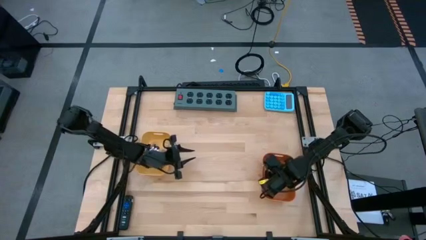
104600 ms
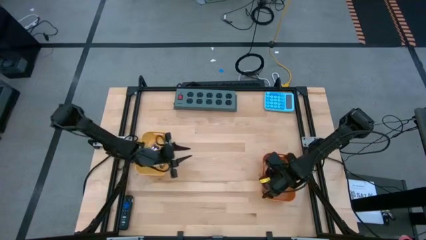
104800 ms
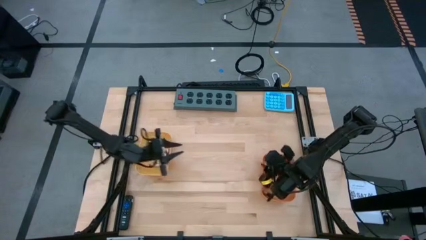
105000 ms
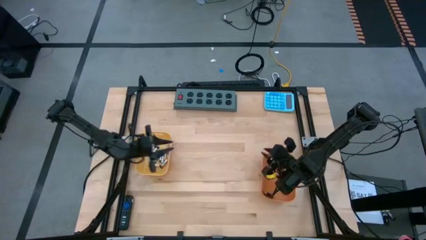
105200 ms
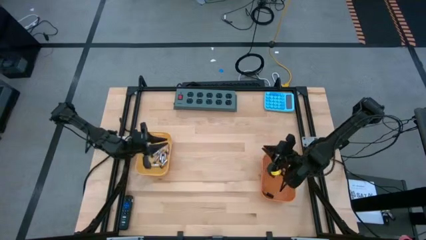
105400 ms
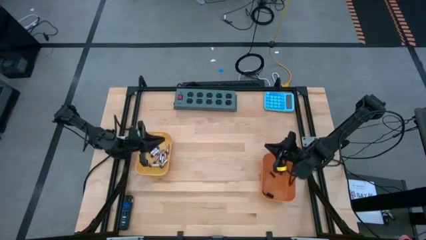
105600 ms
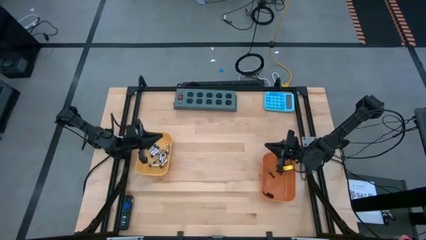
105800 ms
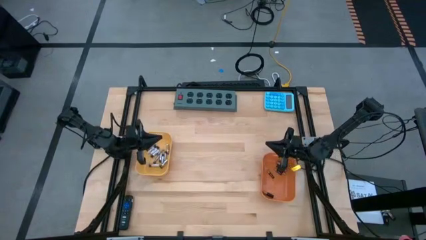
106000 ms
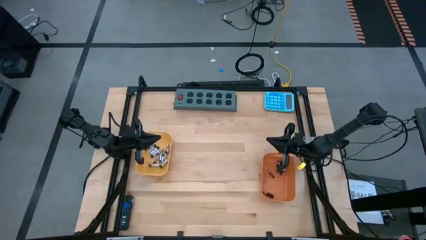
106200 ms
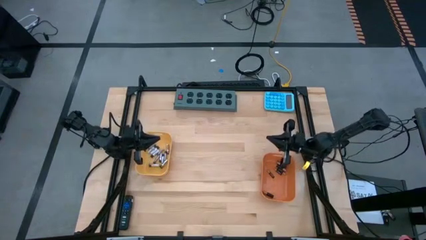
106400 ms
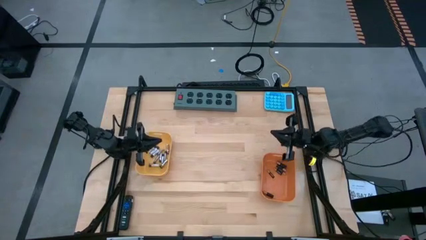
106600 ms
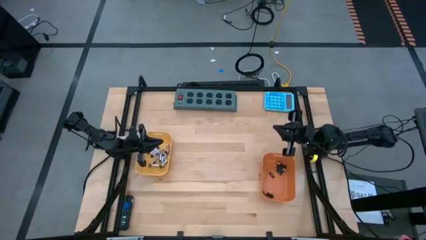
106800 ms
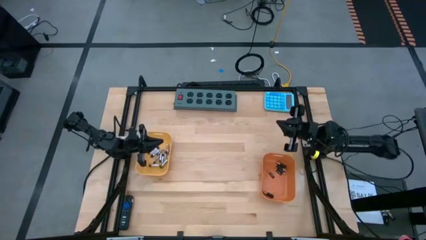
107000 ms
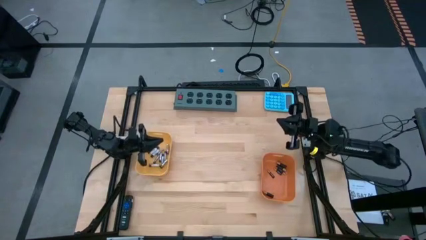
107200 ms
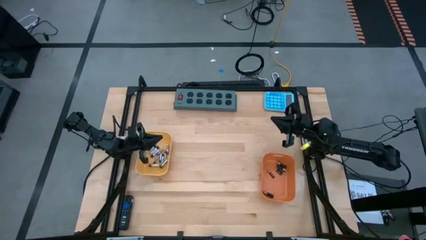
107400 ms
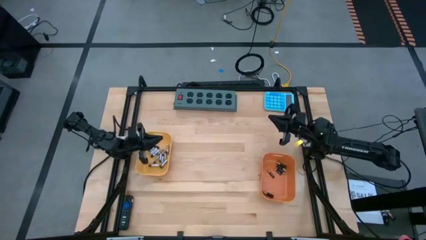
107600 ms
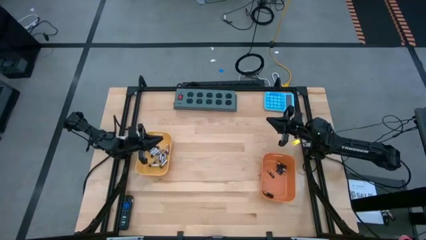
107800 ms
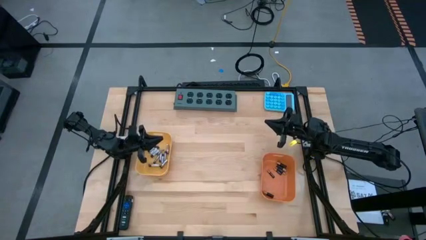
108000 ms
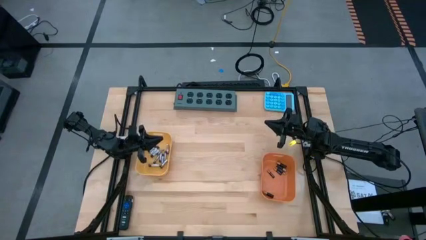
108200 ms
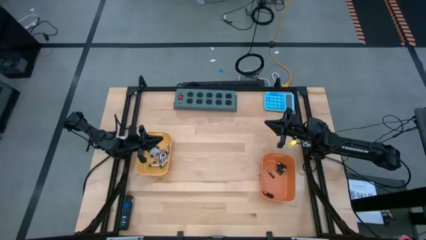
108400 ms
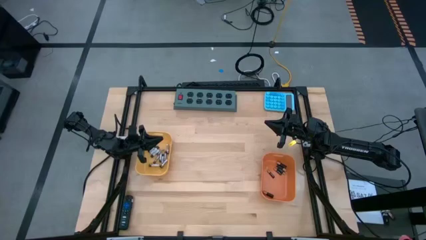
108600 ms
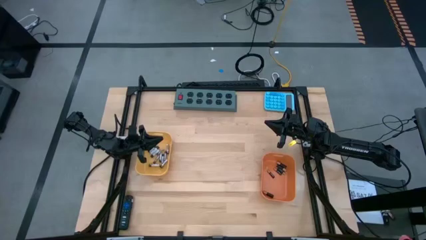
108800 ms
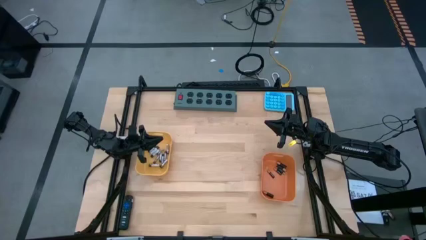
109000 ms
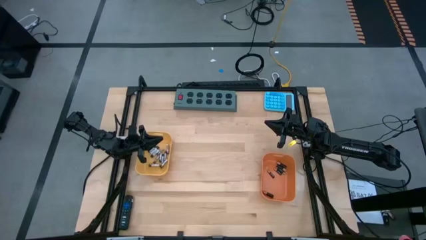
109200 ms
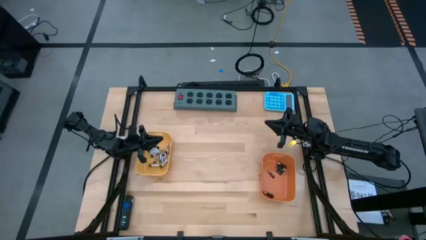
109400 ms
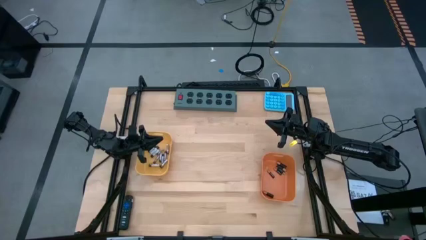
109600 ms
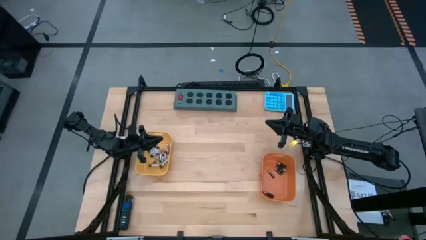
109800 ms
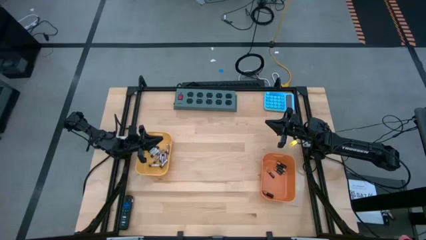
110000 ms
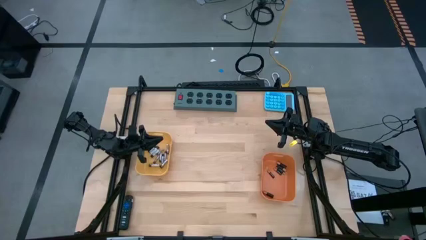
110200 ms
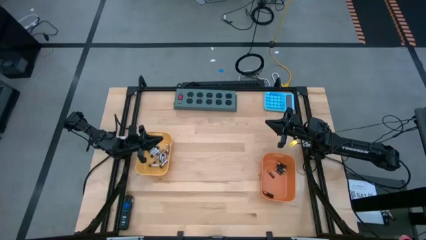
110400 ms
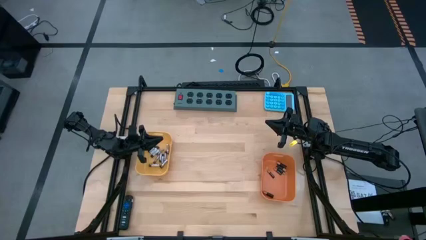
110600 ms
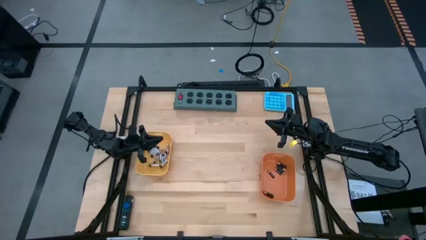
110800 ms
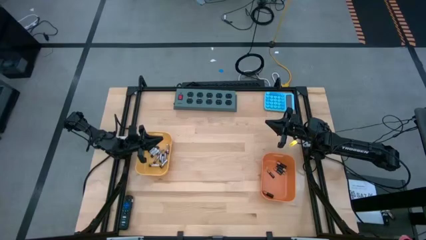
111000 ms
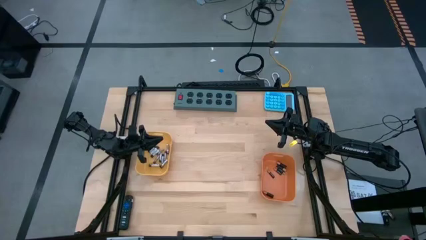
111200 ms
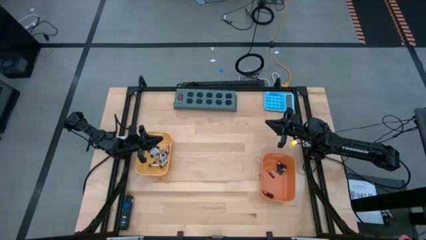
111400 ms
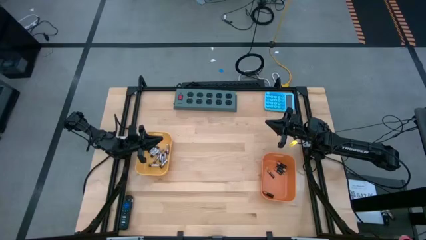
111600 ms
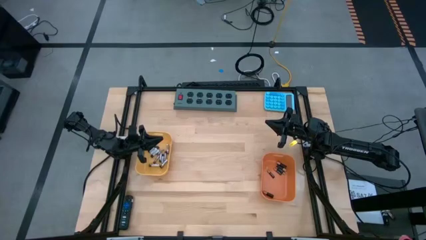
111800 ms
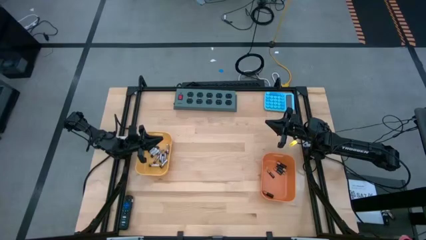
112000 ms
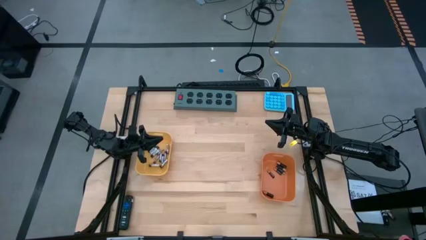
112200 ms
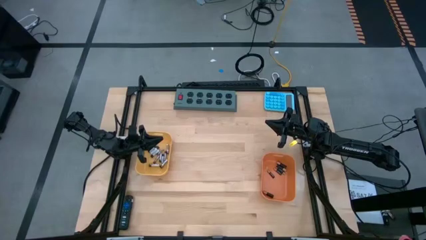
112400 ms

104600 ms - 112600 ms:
Task: Sort batteries
Return to Home Position

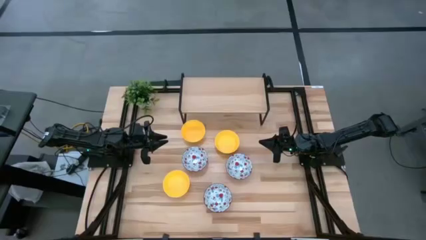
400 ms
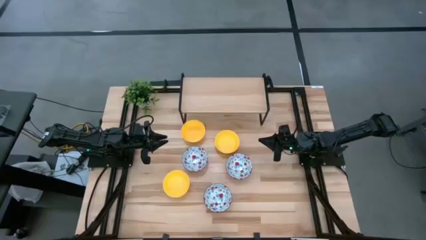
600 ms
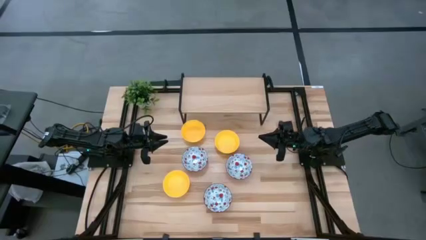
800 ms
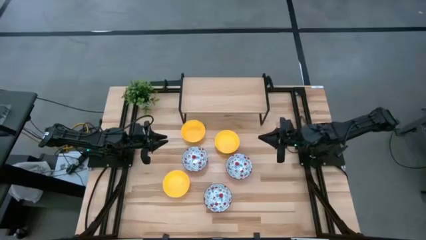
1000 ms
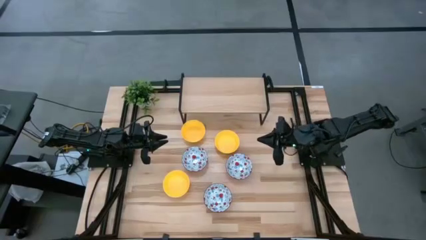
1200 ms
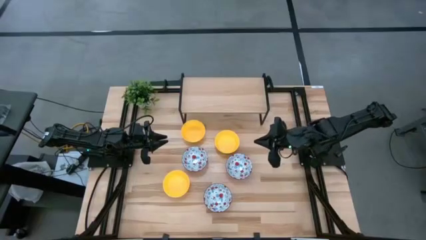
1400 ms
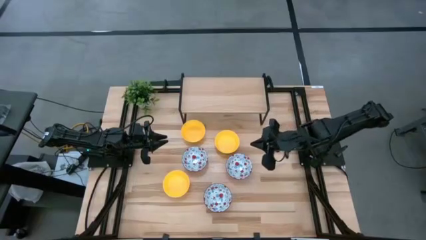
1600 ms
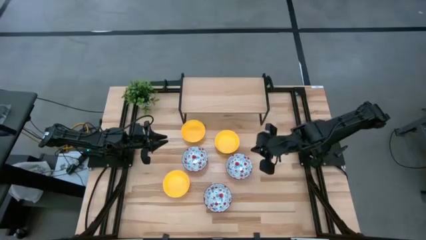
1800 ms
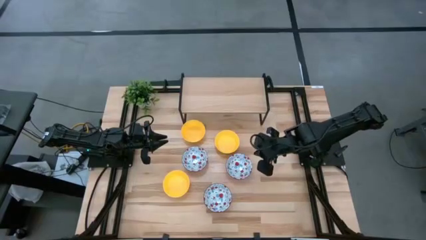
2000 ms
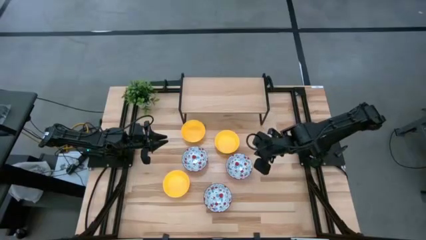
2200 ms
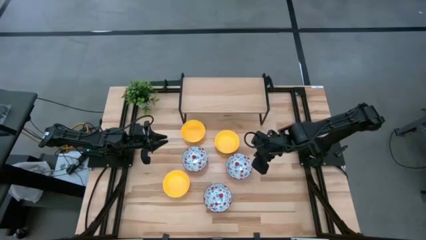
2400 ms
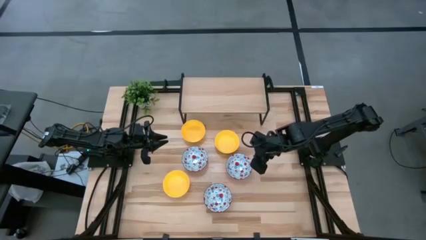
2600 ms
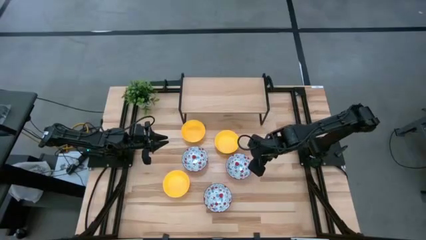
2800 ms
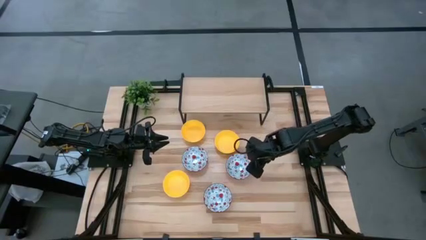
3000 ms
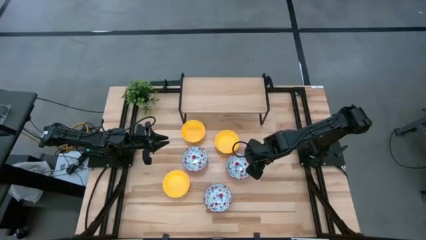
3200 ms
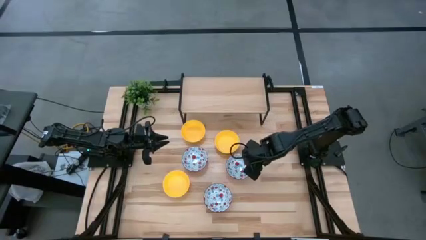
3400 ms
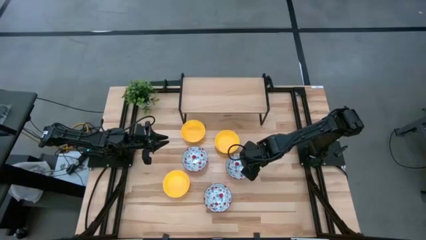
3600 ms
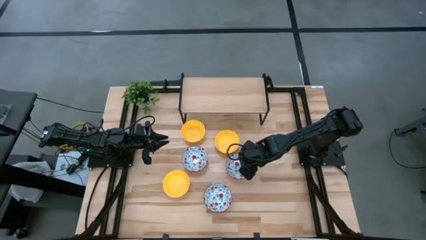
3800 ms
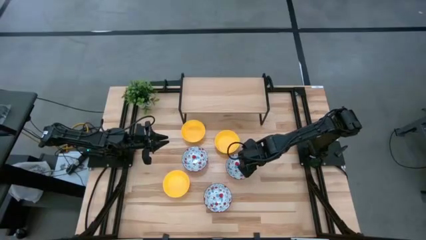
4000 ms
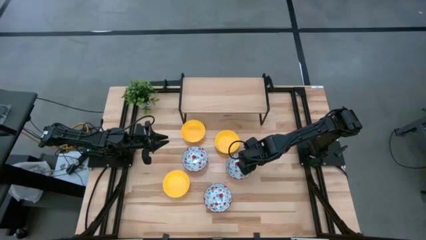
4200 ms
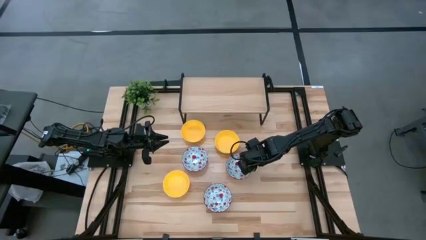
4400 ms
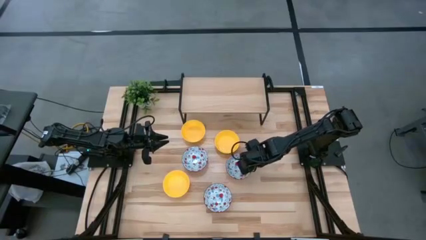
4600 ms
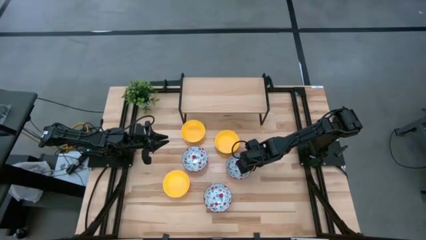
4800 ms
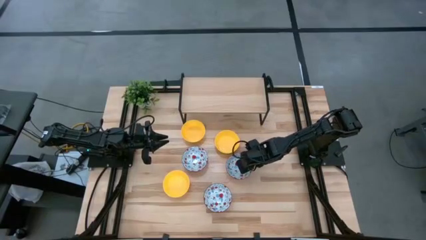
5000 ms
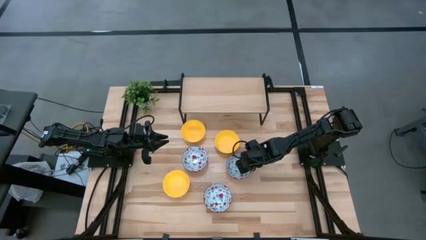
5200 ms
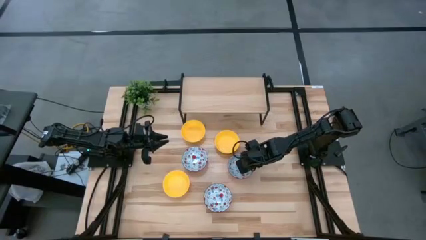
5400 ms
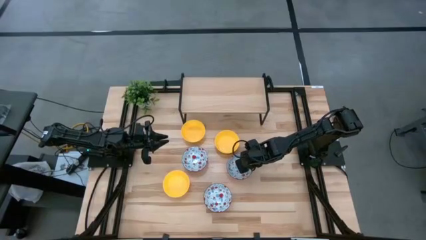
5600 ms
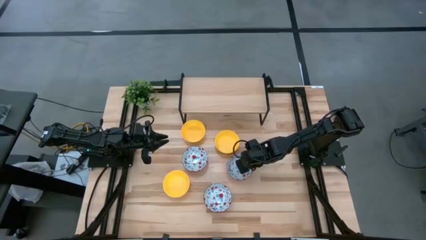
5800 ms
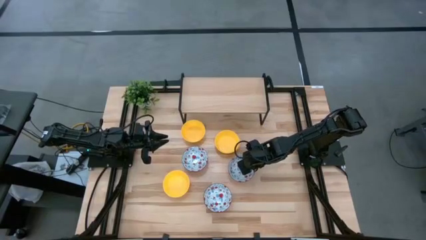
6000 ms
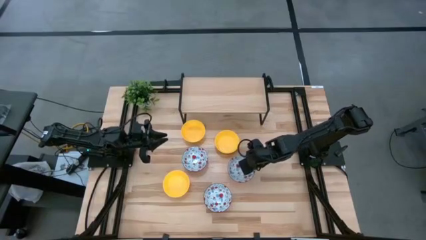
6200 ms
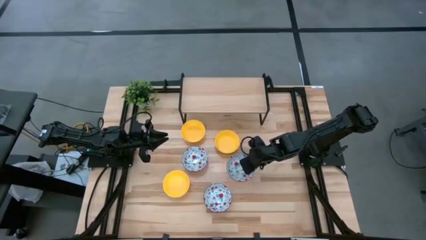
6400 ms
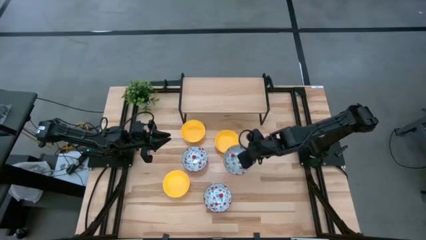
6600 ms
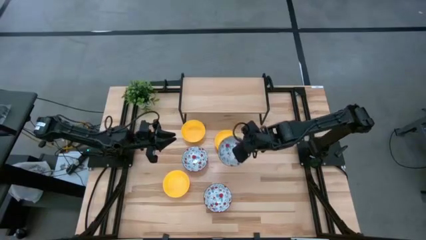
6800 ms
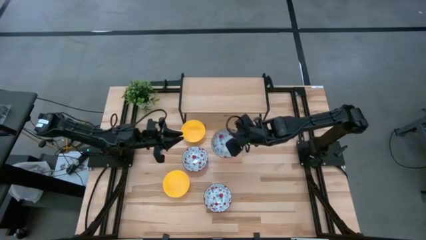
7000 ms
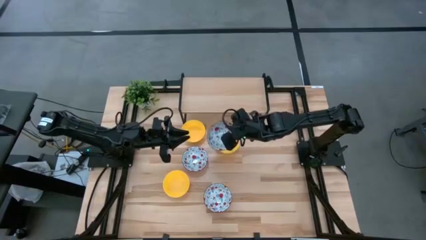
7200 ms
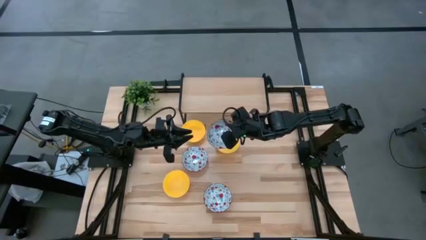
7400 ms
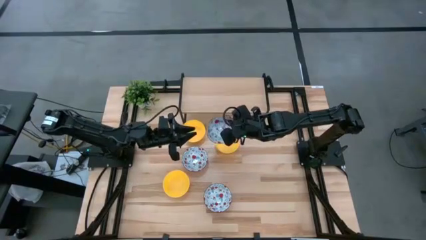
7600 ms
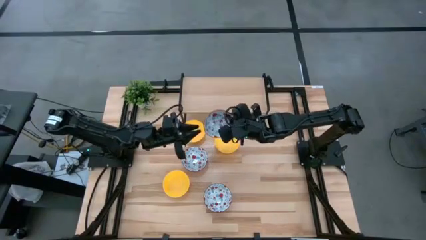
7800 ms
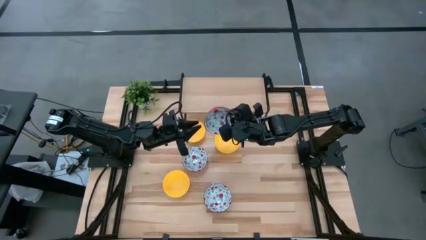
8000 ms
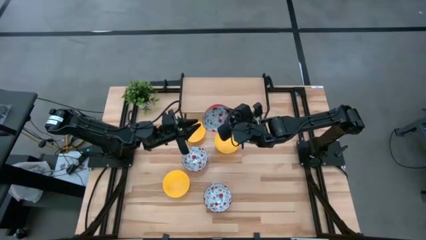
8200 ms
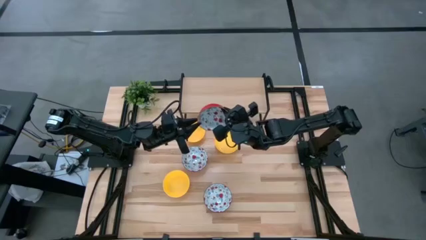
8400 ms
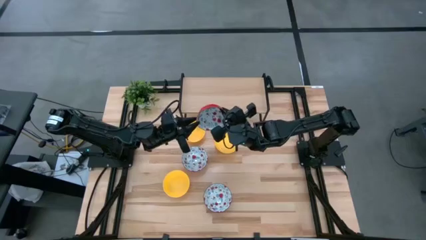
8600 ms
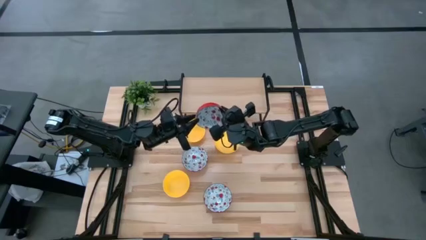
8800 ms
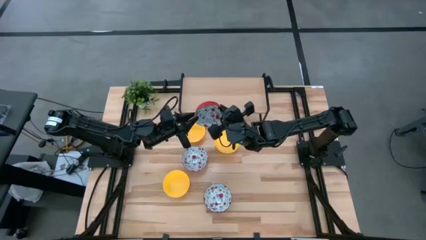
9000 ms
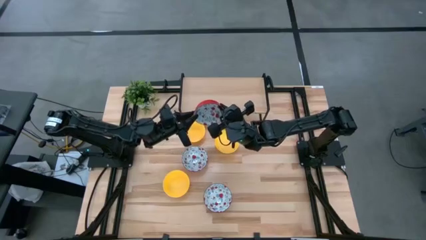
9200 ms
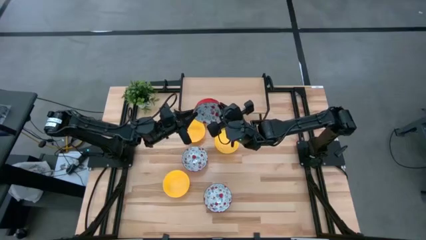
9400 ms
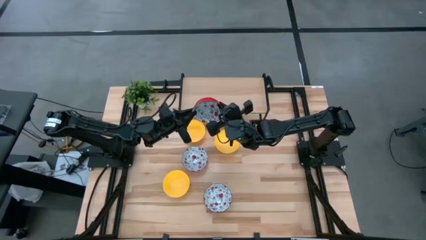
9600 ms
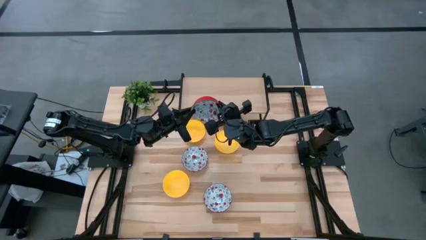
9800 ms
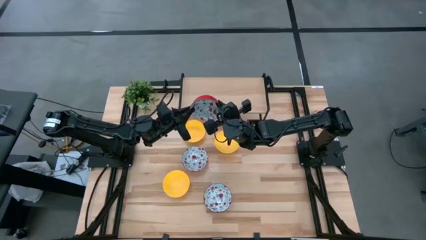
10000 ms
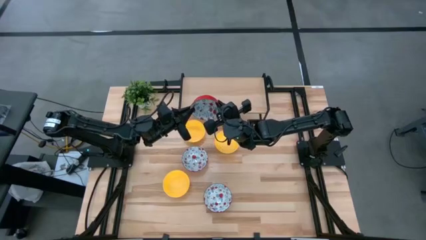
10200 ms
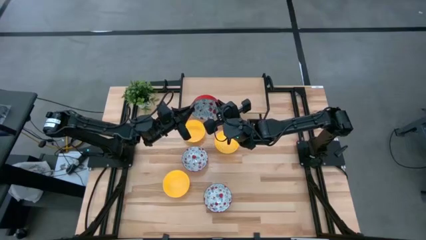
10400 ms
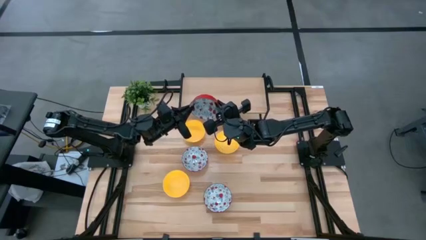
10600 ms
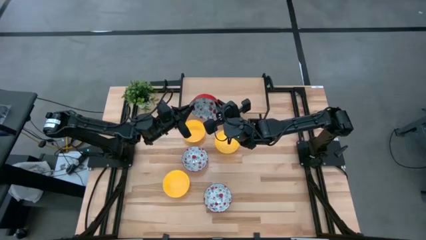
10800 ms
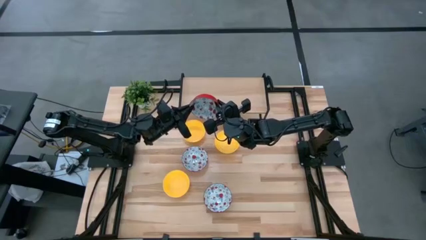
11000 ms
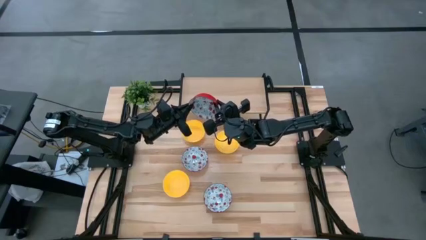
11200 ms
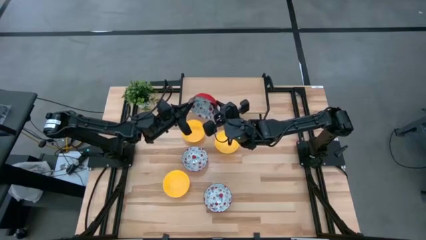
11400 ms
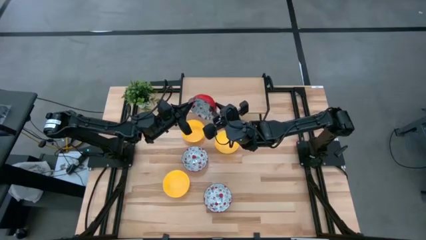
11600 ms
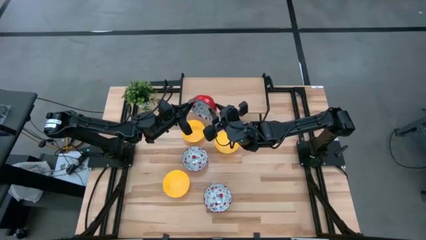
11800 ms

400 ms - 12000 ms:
Task: Pick & Place Mini bowls
Put the top right white patterned bowl on the shelf
